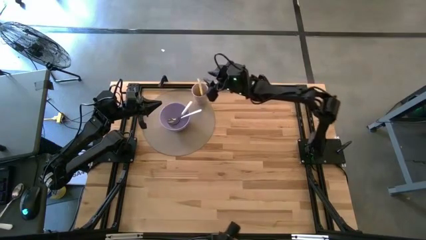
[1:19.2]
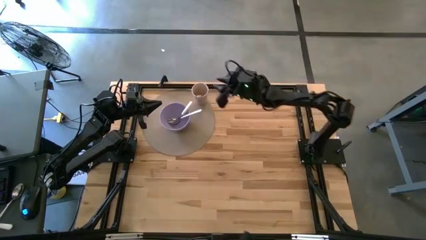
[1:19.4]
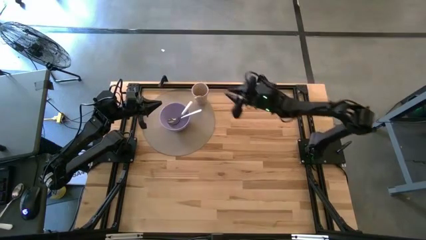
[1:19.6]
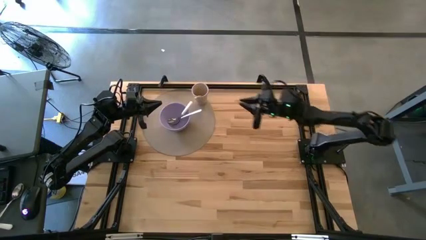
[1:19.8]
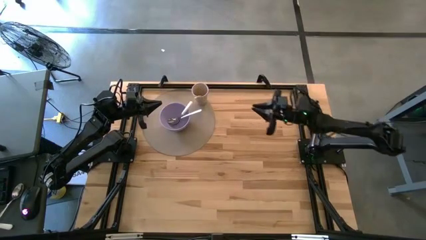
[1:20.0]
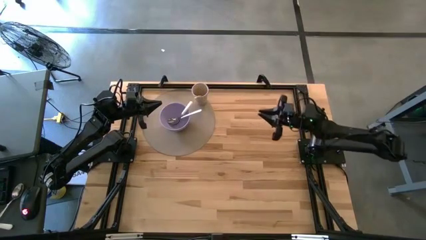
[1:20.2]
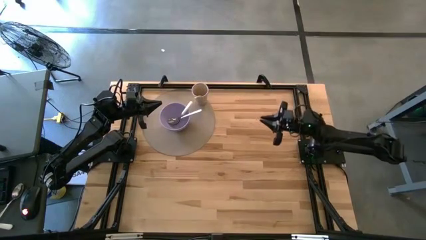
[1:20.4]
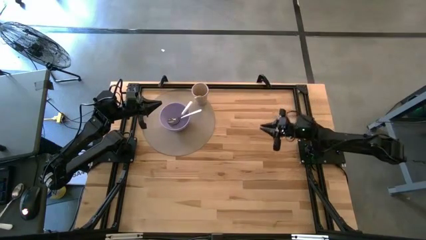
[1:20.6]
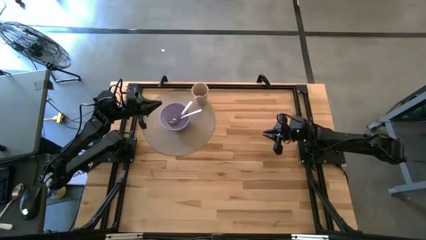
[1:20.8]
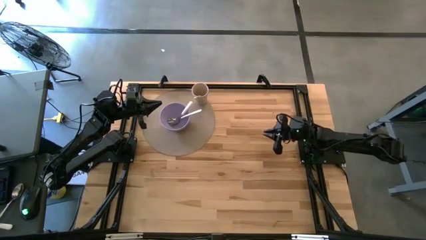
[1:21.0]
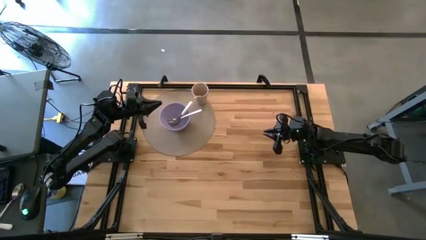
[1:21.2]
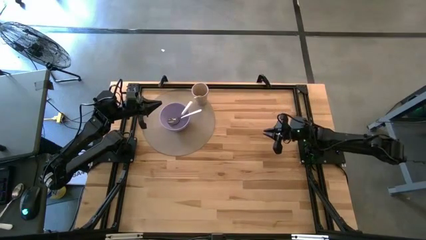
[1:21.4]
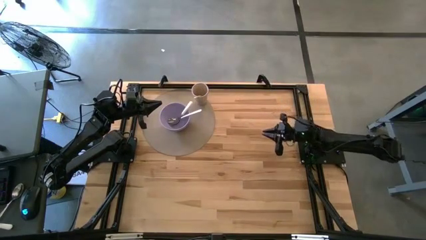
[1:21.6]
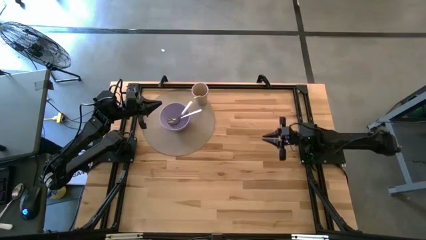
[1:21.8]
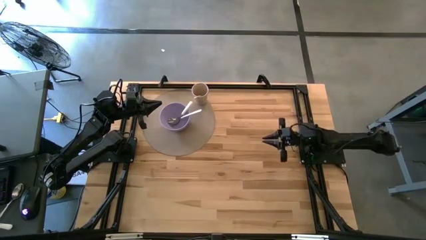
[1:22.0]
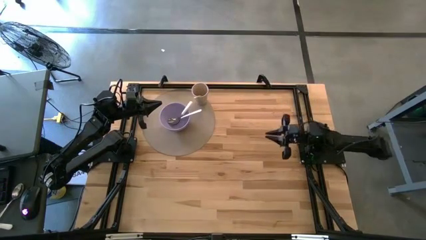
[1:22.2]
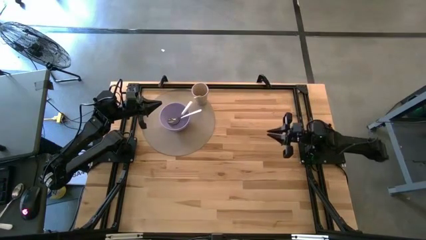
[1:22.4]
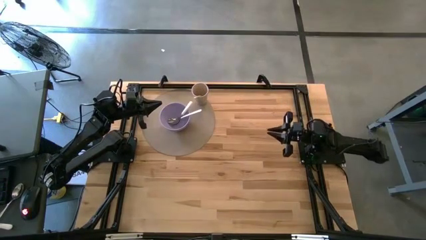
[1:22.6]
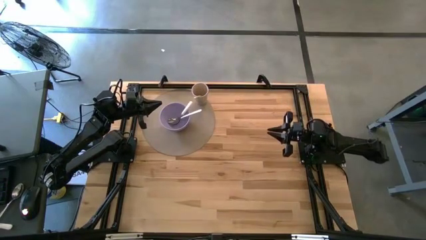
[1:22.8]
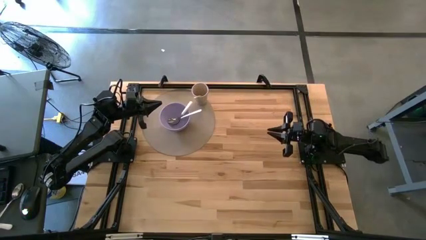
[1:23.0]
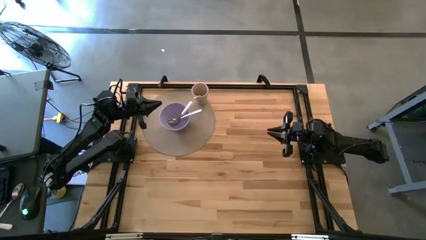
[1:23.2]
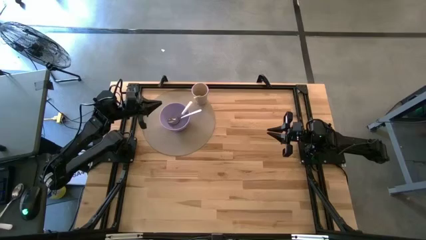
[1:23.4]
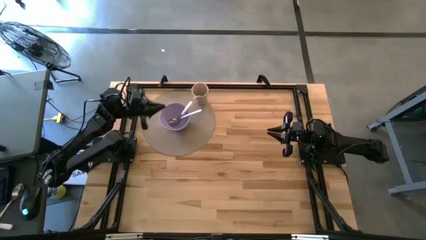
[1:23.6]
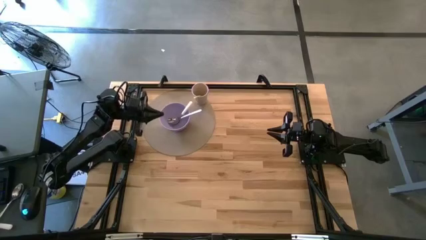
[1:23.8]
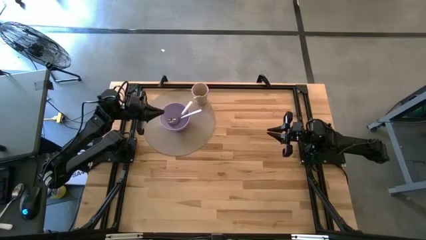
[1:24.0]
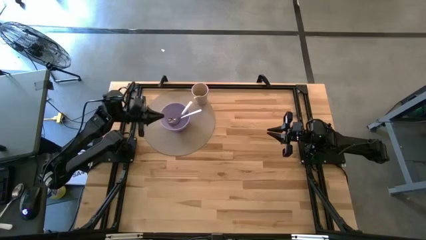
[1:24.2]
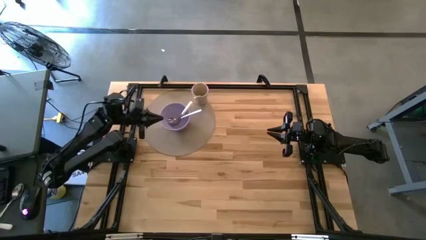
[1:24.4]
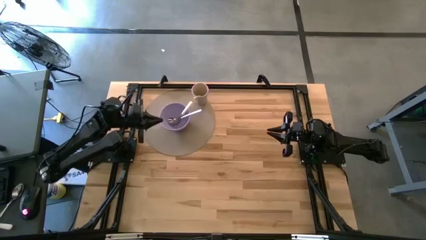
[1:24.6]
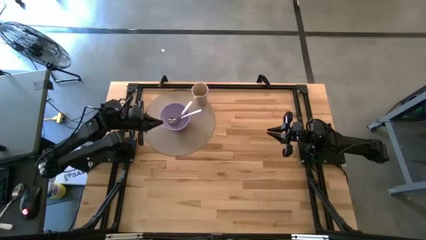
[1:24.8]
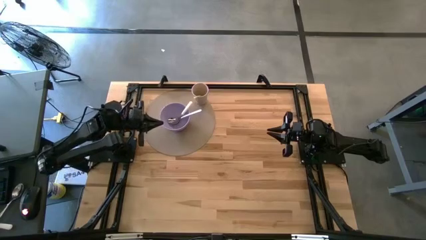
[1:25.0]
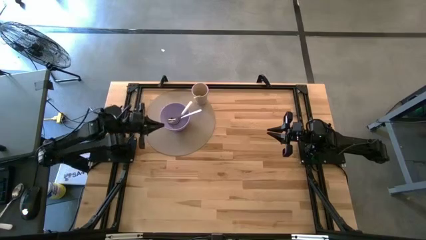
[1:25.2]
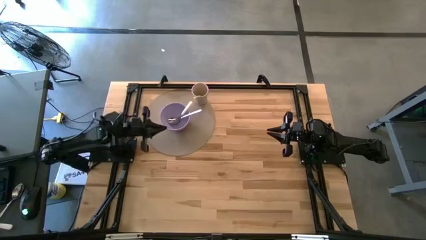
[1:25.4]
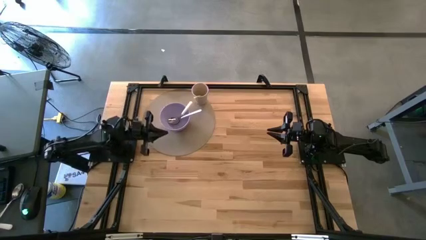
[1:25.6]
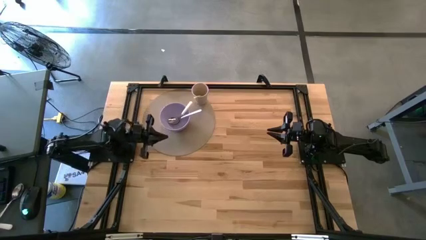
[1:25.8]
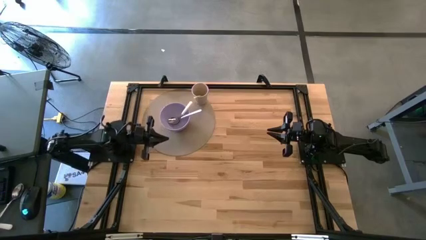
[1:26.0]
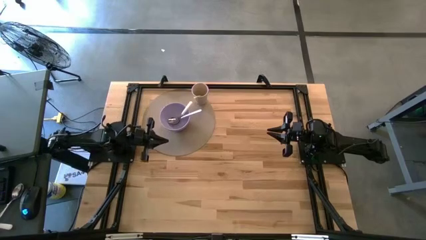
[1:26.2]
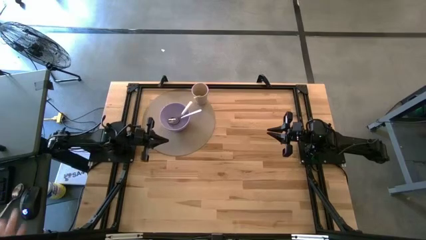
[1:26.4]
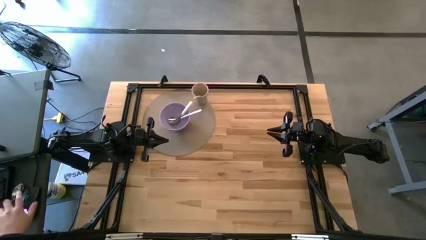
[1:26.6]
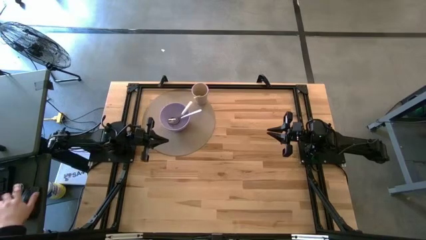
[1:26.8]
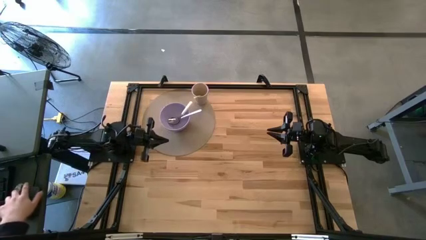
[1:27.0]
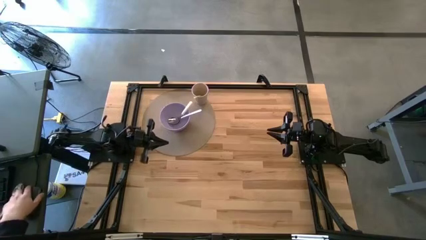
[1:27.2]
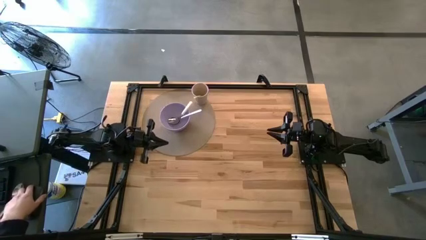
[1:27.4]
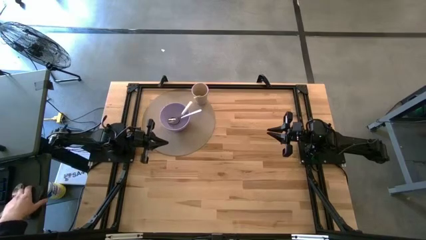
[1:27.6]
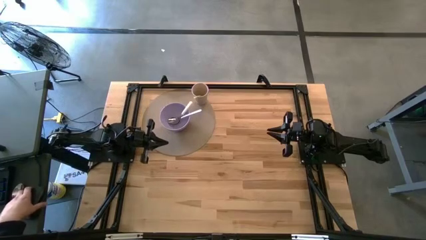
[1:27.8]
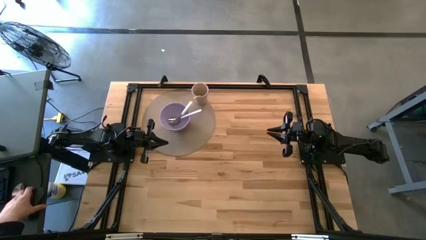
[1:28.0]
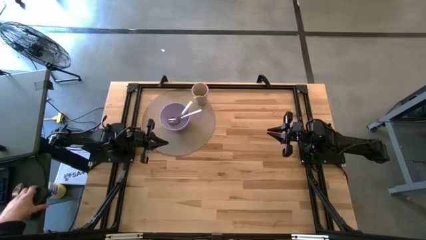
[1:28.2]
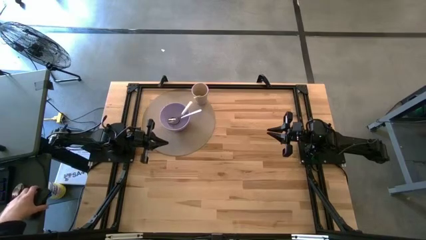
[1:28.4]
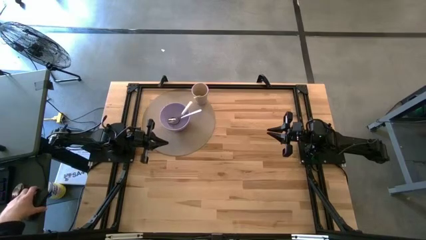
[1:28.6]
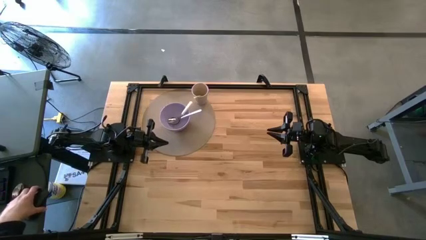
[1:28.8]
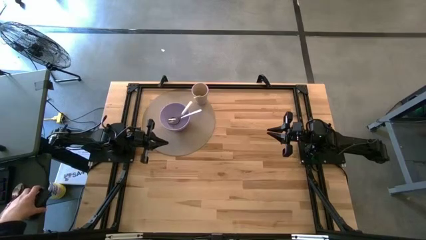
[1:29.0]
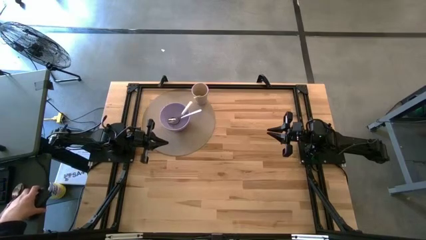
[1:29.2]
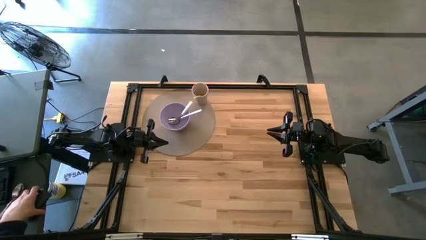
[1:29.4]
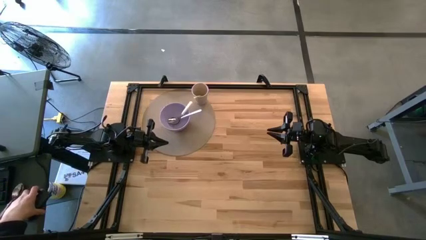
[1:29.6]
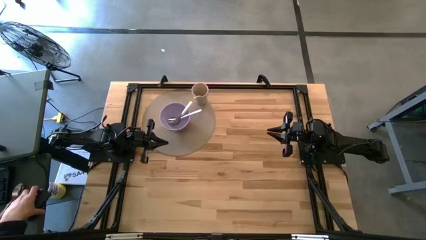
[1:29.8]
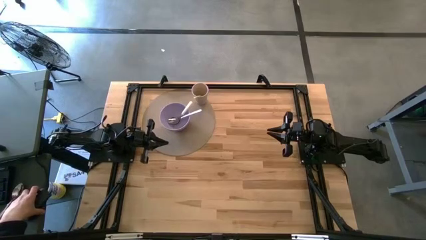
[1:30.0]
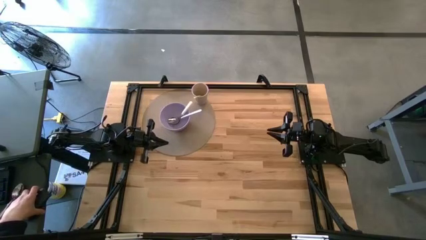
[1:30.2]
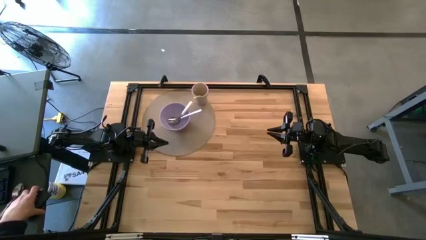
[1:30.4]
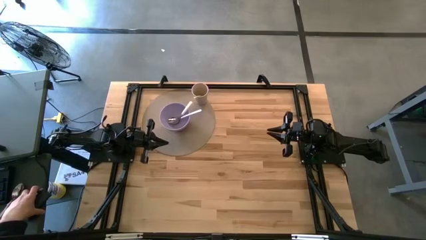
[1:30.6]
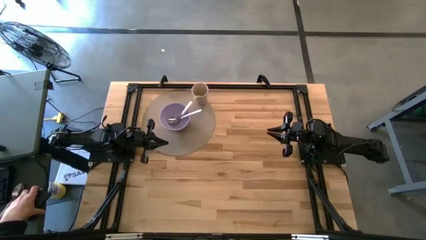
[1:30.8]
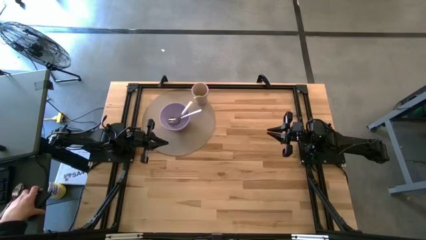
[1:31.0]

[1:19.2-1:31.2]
Task: Pick & Place Utensil
Return to Home Position
